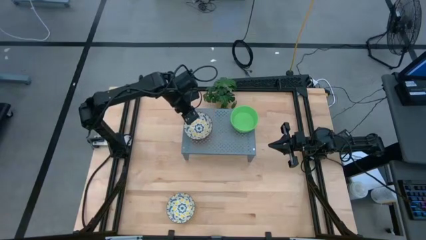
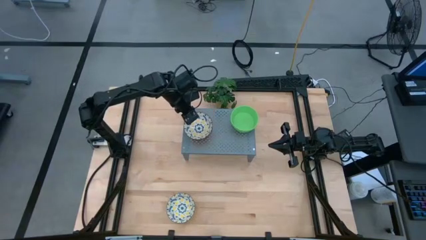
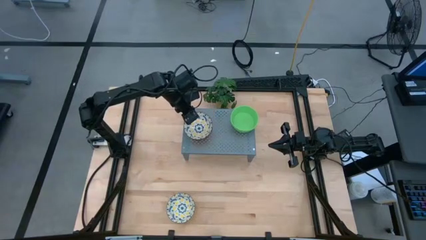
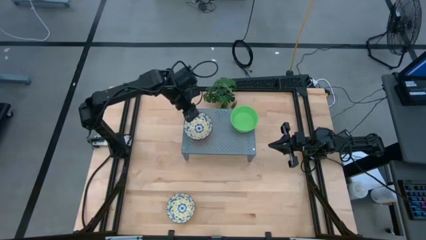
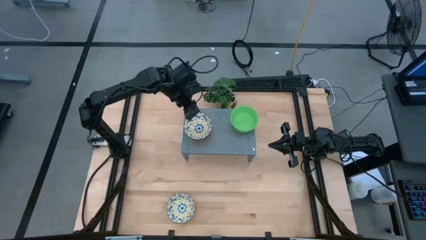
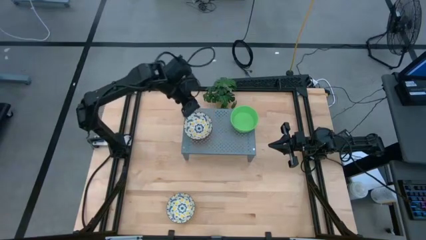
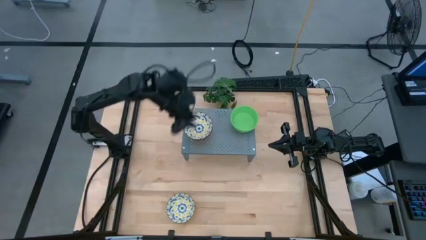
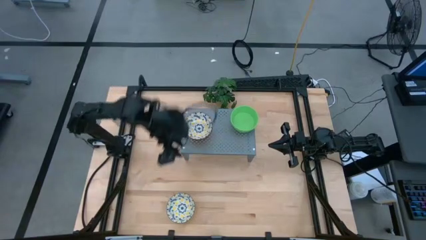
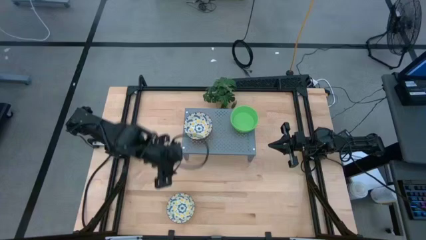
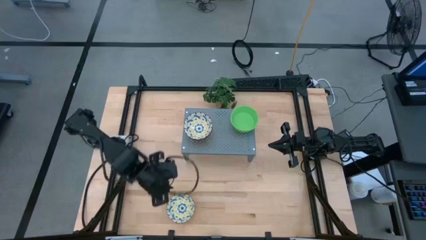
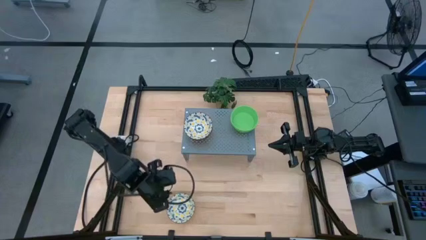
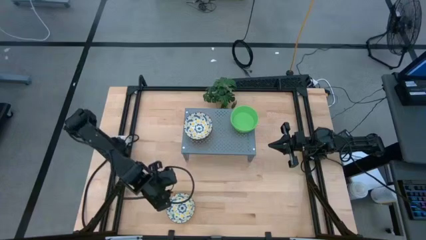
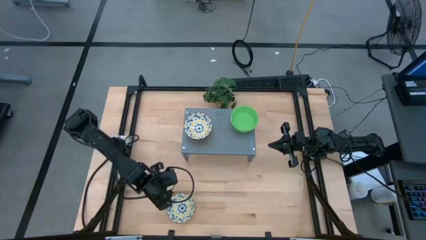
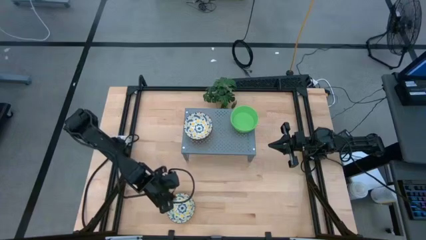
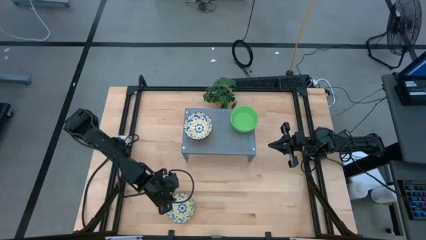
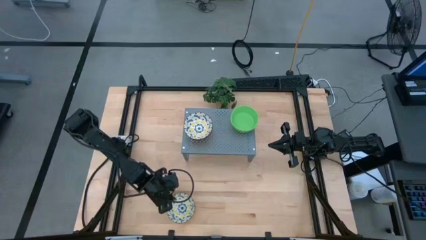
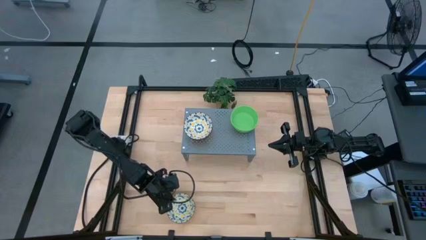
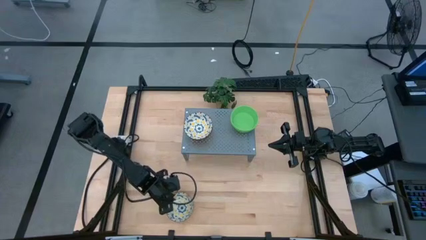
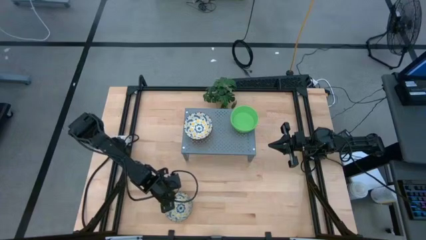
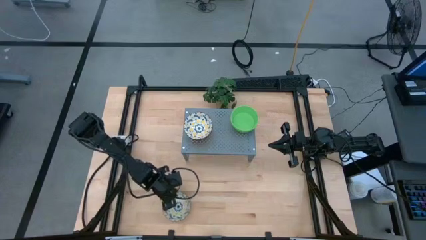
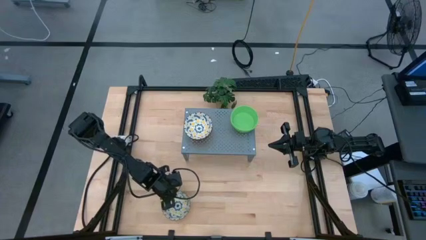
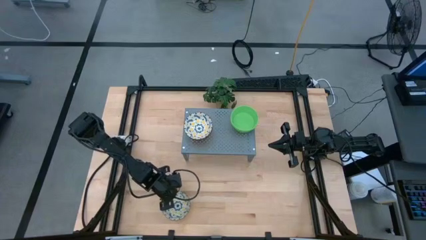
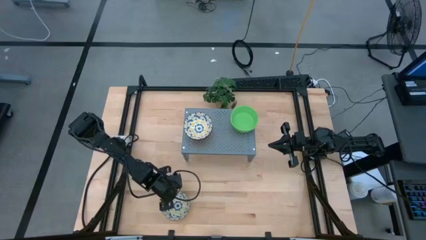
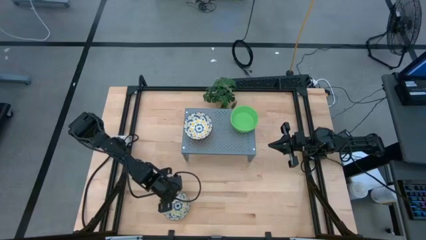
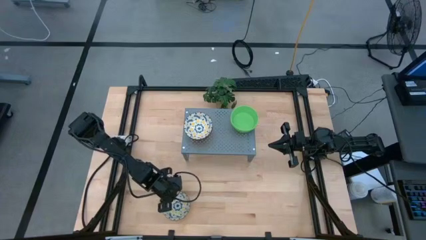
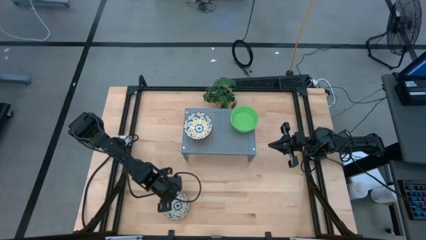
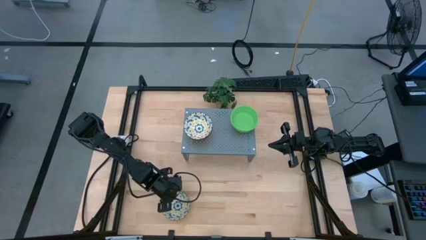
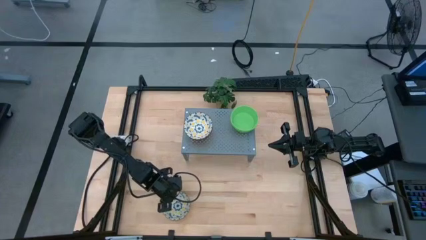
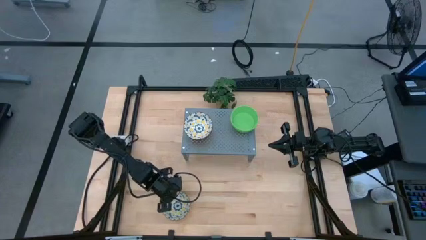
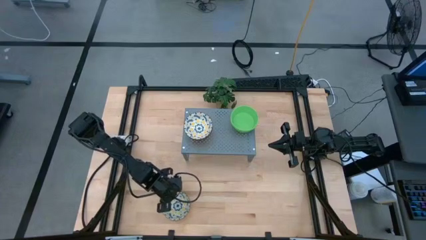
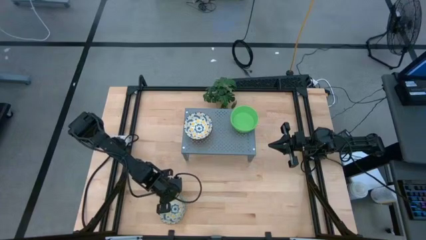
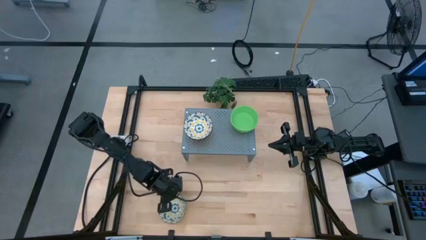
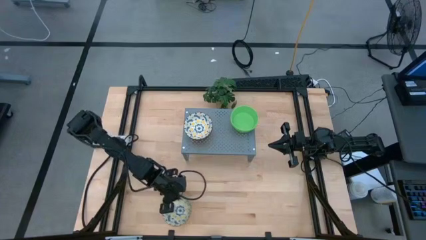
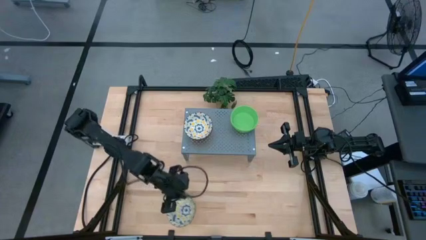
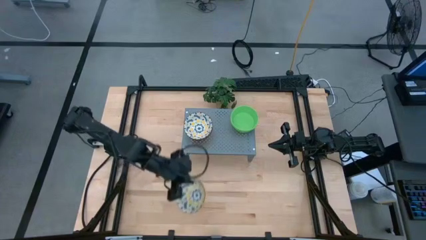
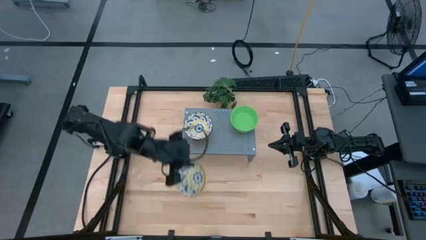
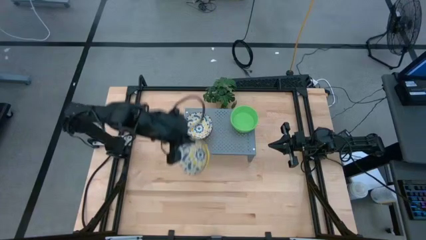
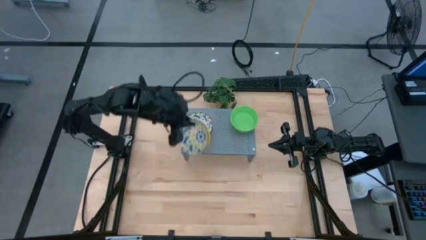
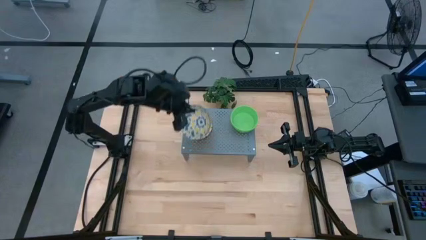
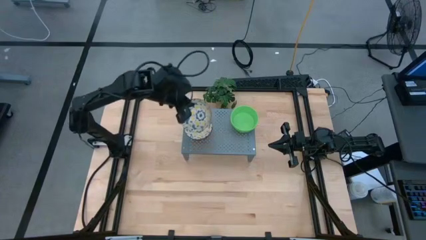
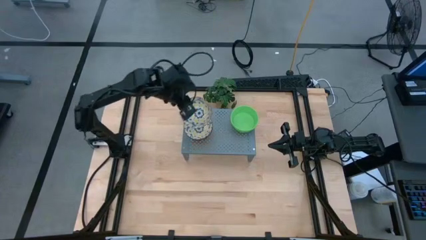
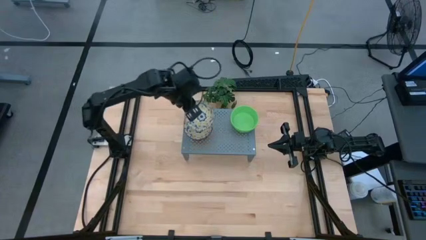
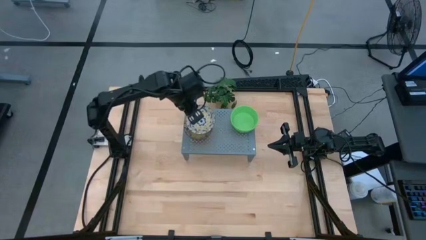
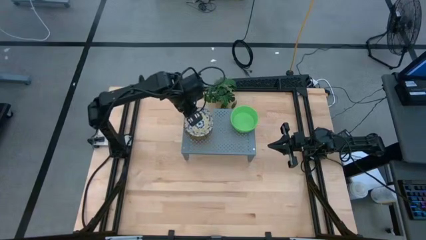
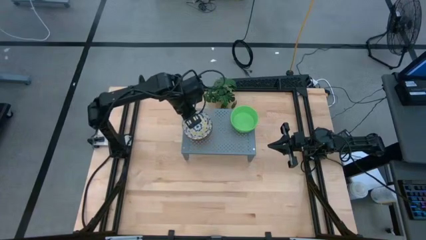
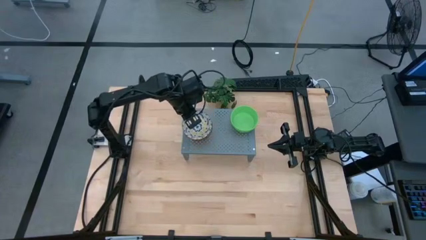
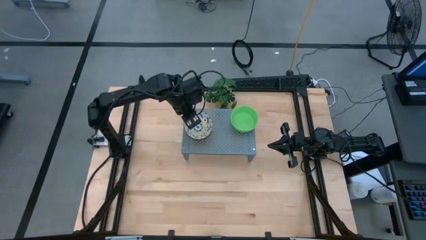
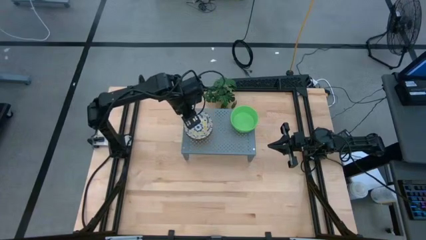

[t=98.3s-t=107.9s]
Task: Pick & Place Mini bowls
Stack the yellow bowl on the yellow bowl on the shelf

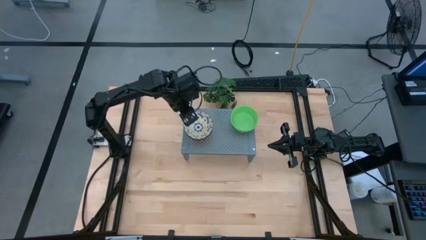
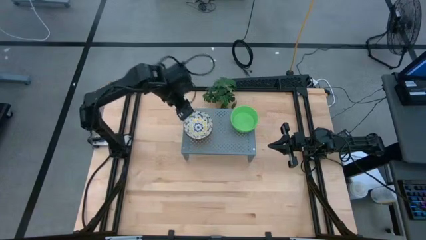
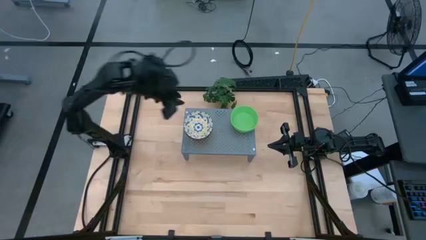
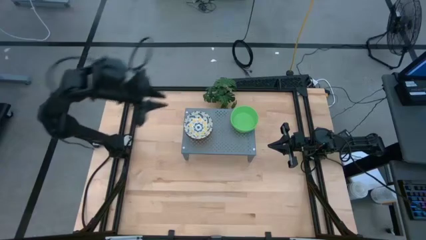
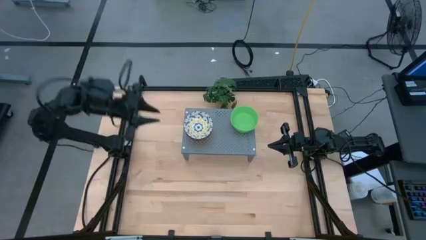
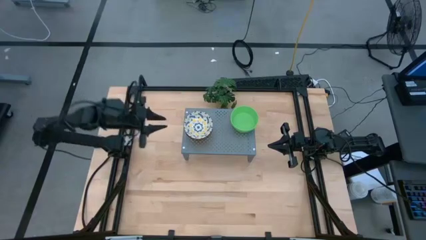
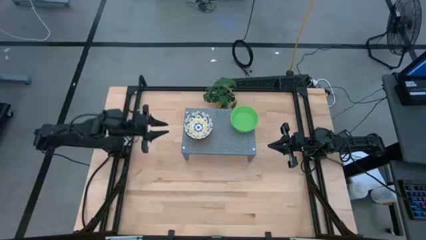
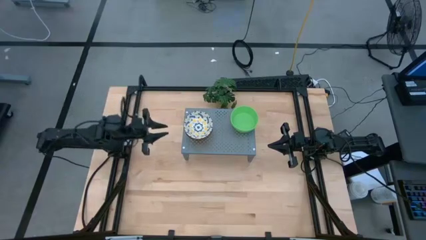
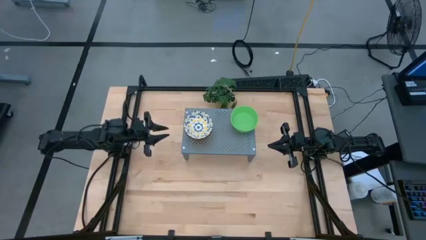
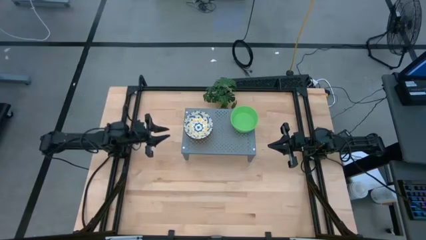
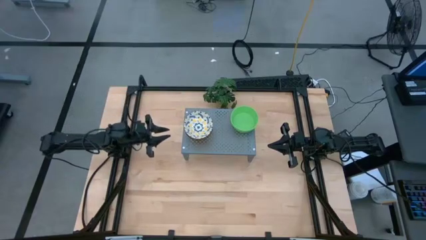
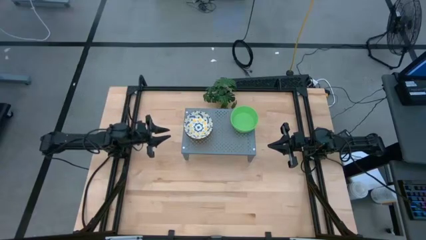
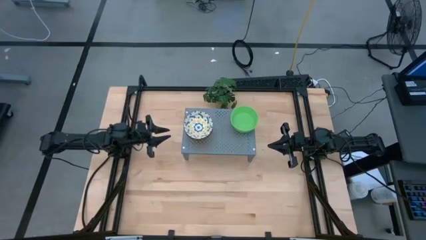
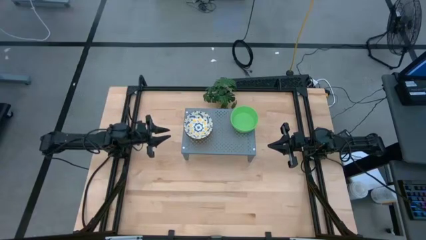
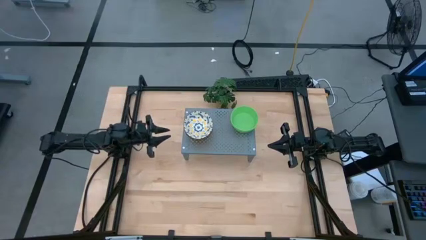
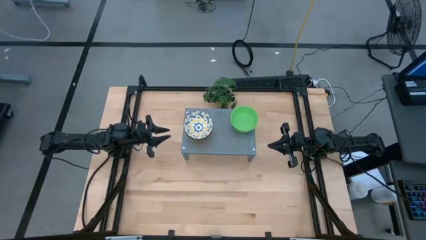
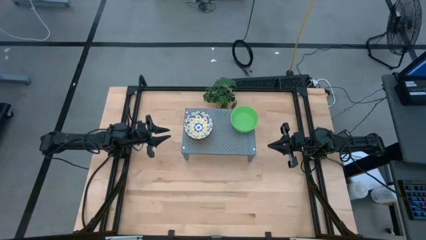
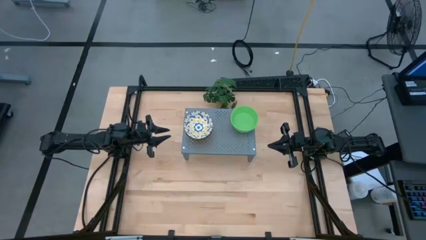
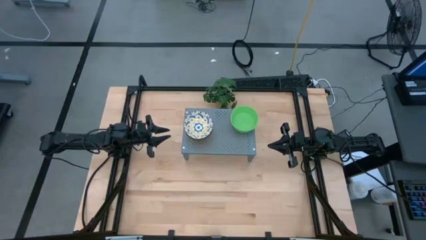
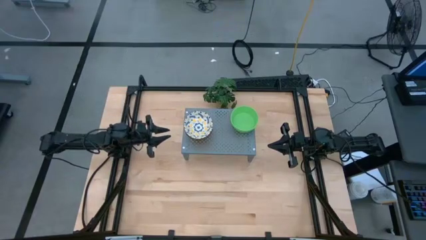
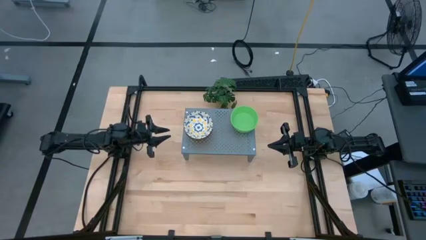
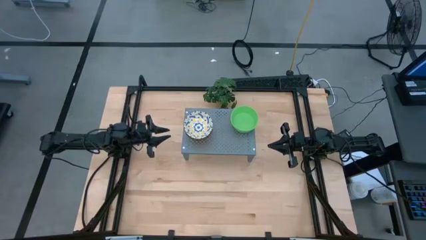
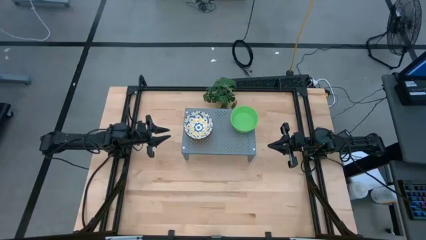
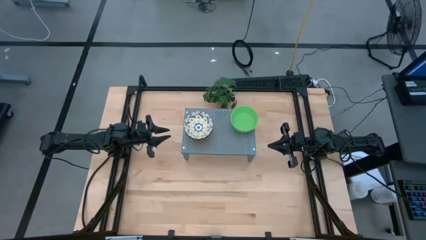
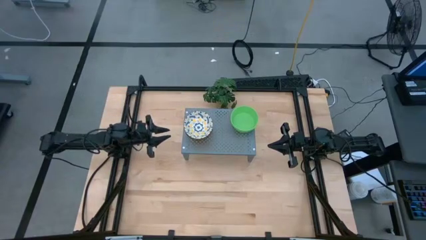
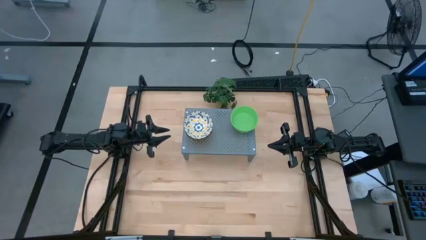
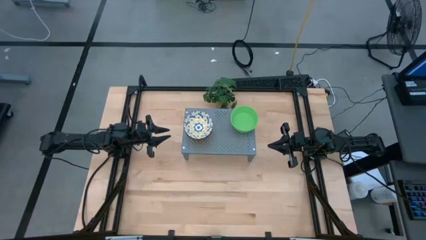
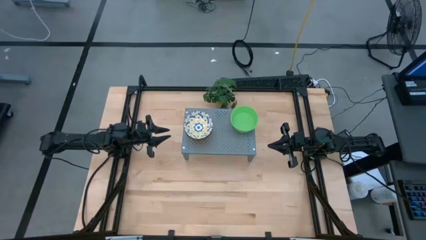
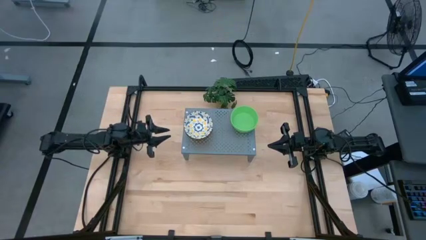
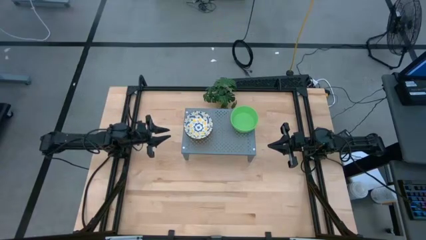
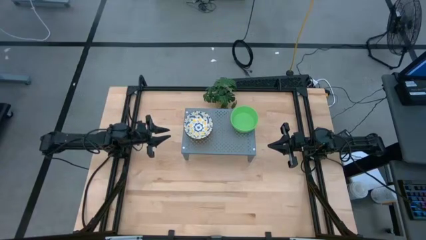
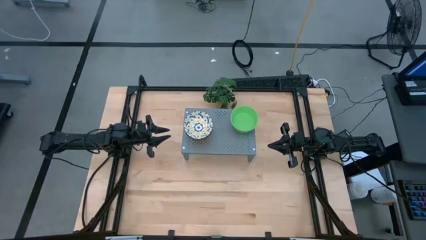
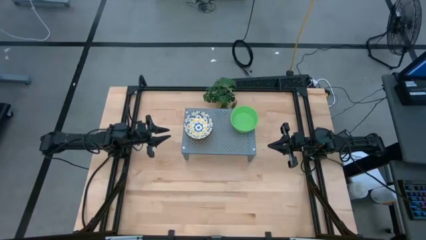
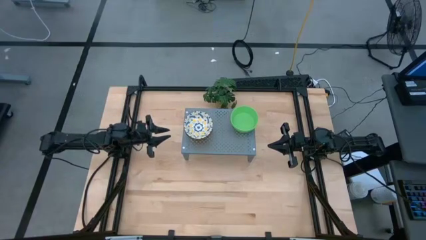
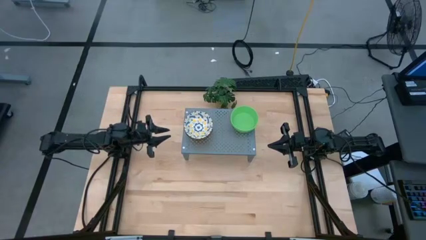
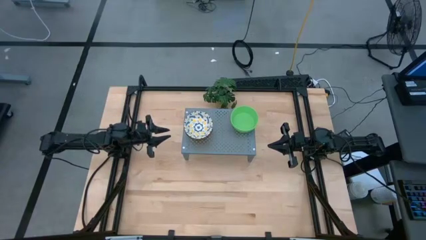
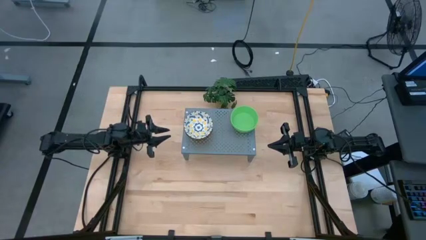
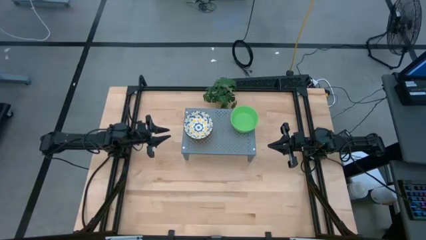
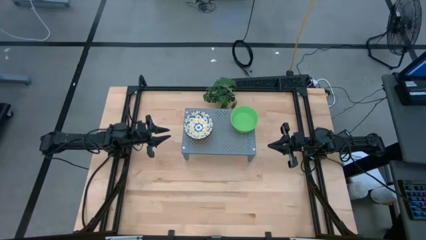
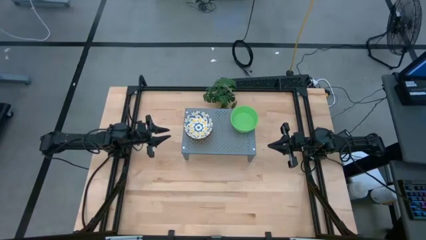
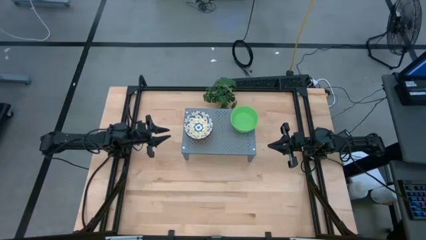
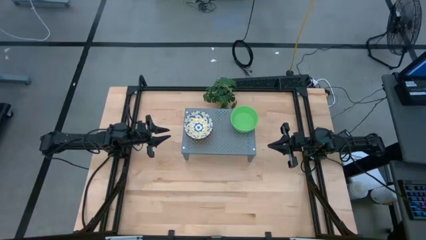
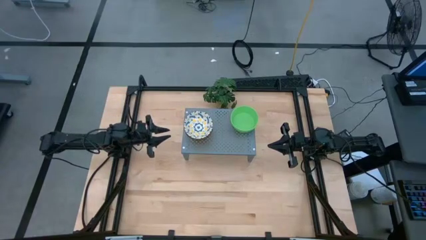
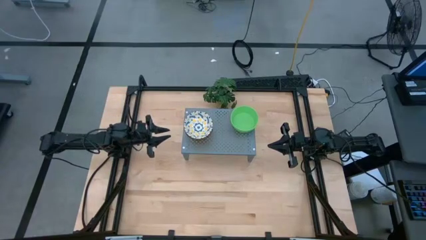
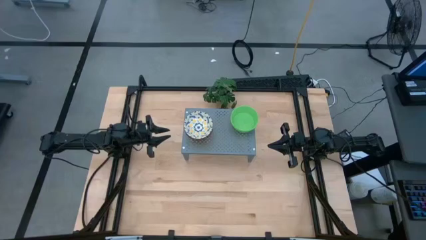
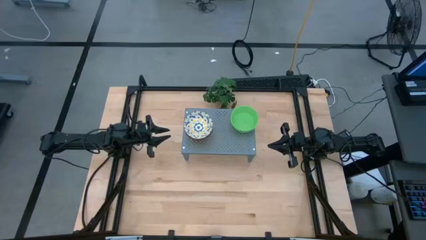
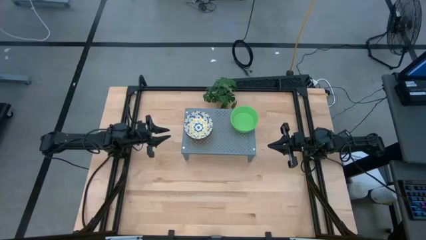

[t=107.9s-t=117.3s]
Return to Home Position
